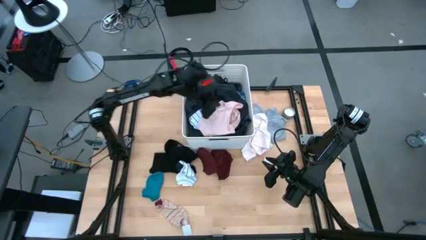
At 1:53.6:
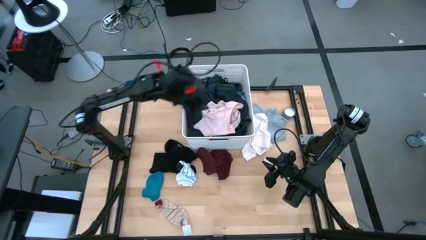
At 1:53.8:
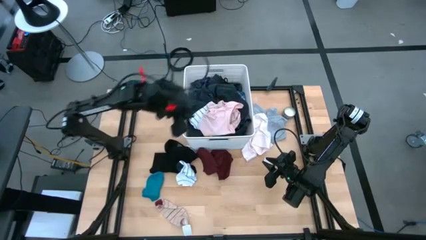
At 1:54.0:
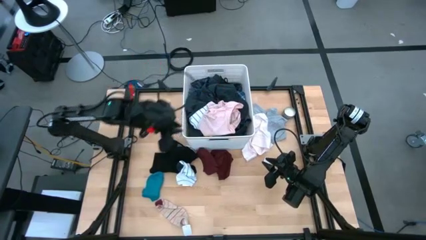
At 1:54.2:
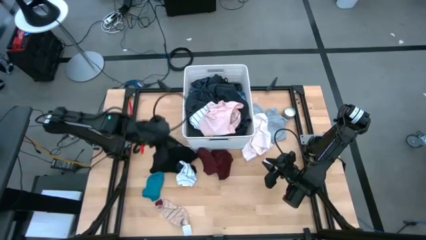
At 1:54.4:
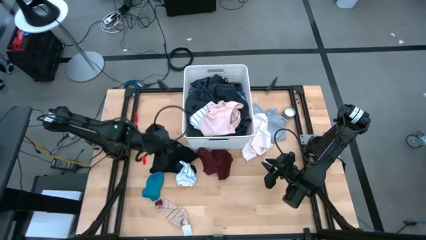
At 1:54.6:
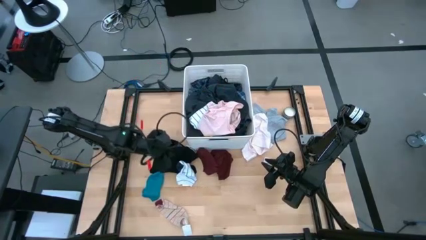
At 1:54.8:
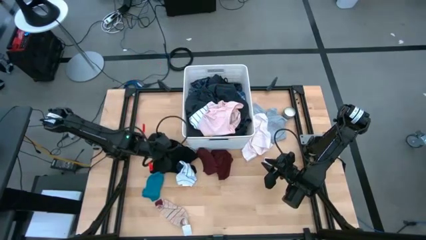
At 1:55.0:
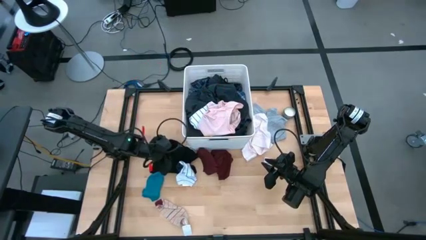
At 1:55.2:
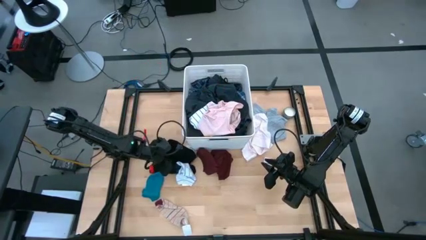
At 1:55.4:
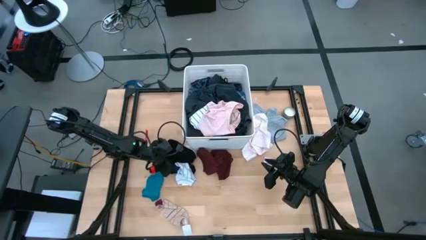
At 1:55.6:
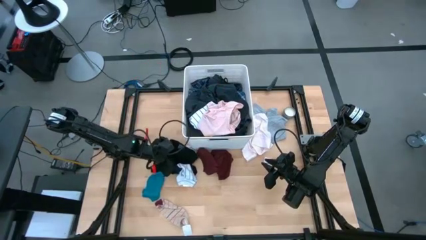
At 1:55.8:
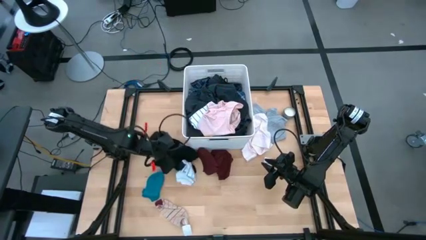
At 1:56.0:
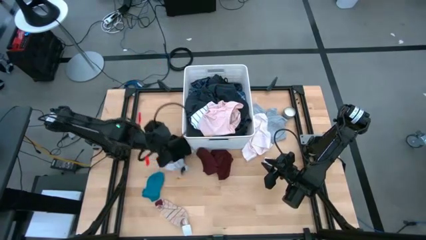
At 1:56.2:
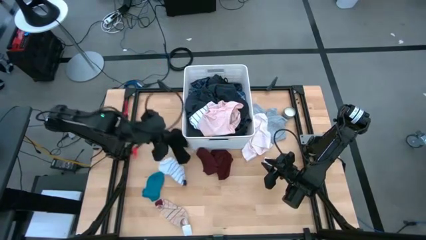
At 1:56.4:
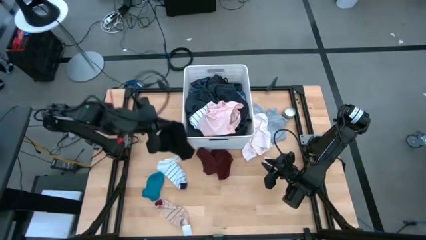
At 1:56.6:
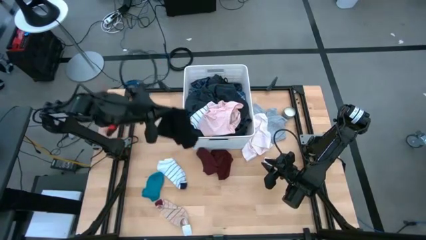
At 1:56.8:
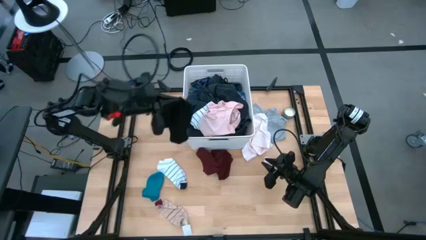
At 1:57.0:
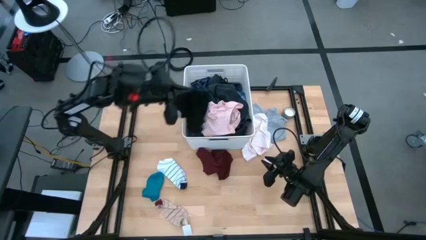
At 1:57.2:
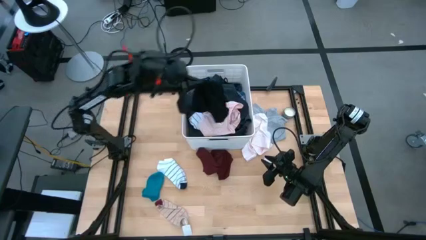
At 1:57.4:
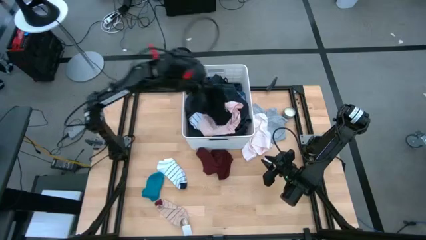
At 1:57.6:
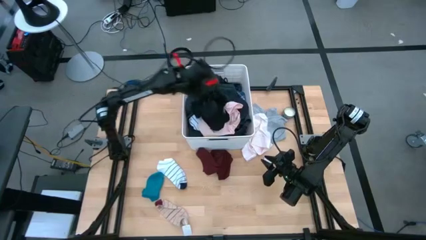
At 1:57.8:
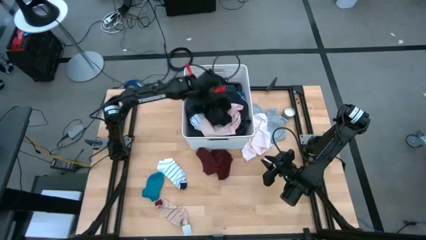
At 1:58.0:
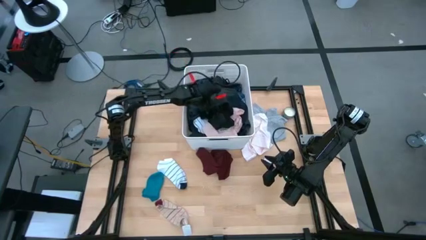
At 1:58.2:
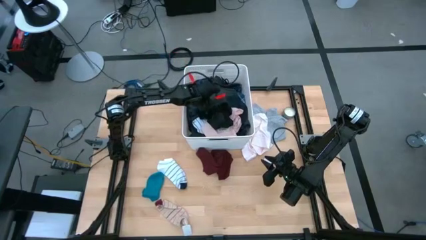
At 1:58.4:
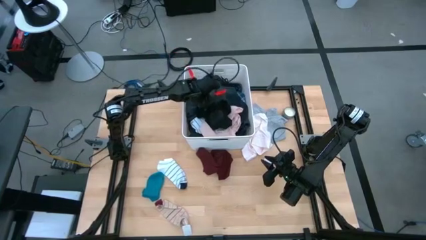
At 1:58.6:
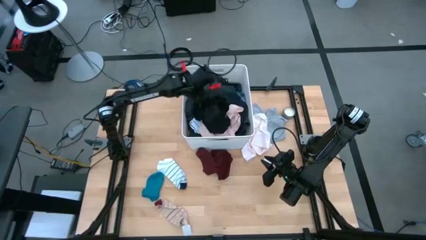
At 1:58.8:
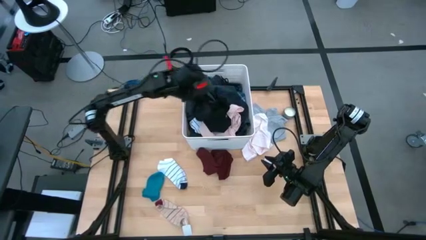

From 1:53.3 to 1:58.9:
Task: Sort clothes
Put the black underwear into the laundry bin

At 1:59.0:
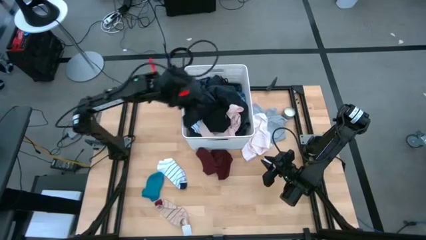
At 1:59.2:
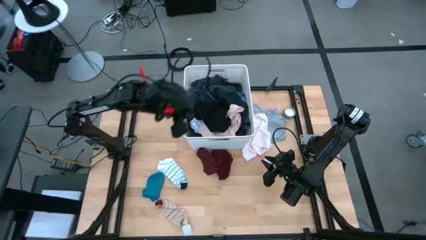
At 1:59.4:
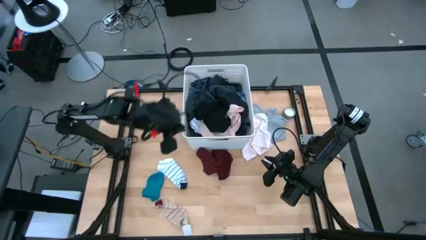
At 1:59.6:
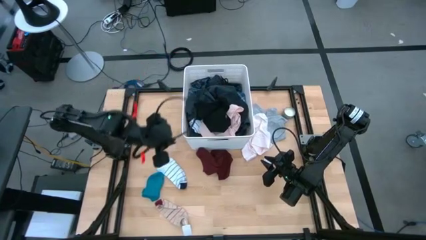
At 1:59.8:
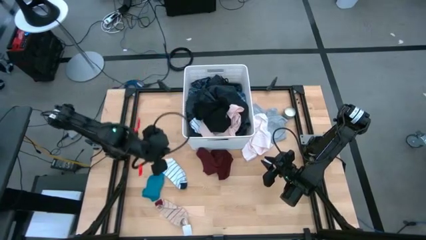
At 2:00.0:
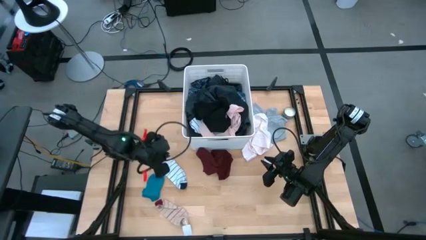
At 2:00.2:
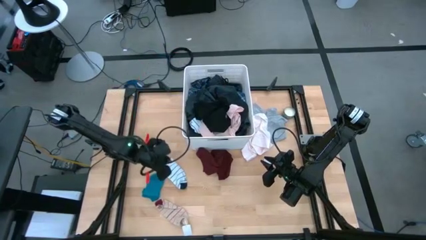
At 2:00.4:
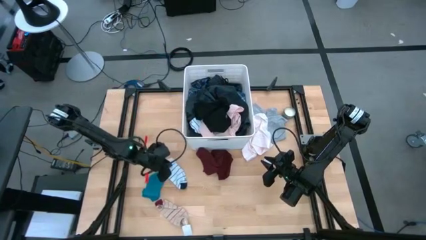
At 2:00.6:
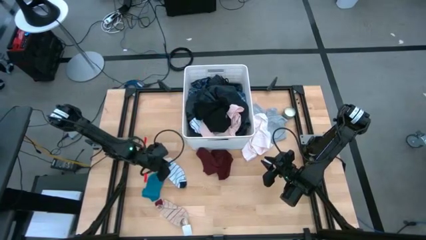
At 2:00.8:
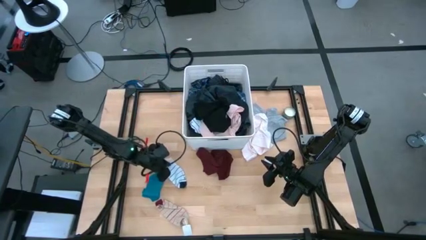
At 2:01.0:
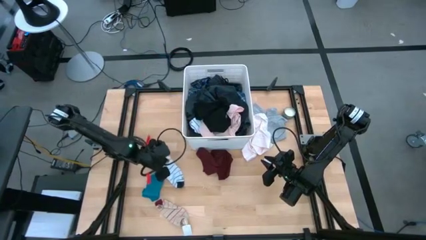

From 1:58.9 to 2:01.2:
Put the white sock into the laundry bin

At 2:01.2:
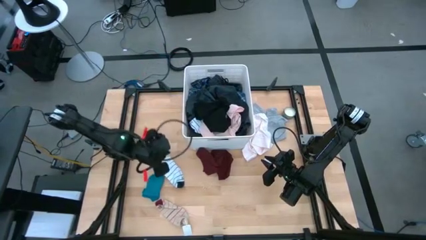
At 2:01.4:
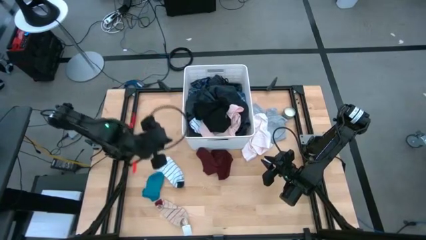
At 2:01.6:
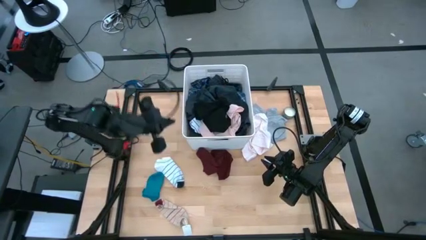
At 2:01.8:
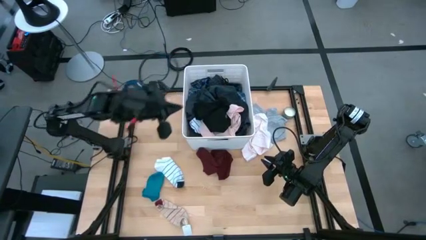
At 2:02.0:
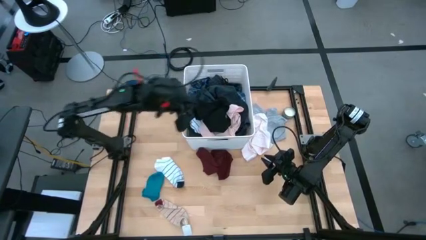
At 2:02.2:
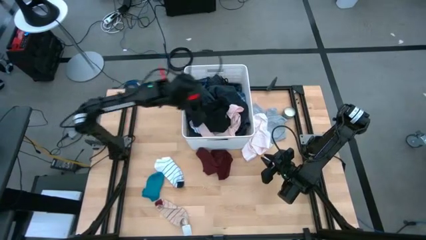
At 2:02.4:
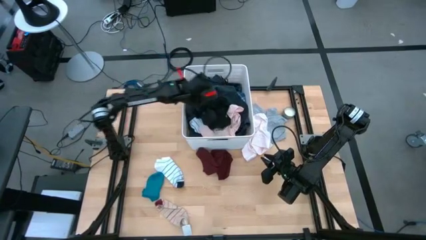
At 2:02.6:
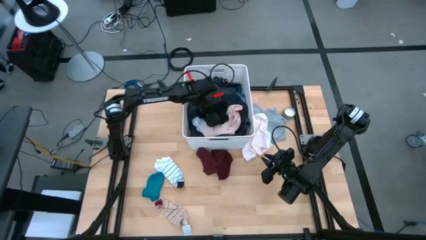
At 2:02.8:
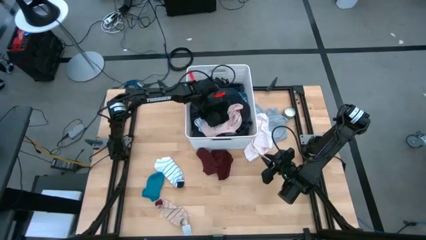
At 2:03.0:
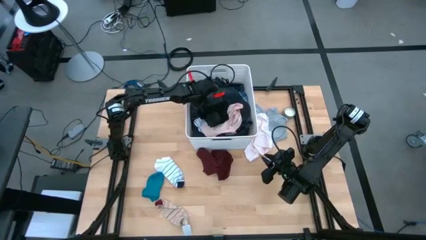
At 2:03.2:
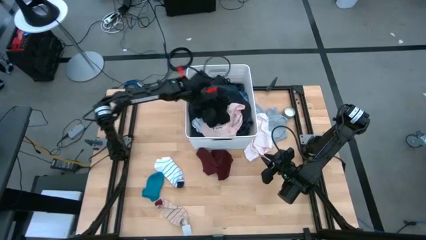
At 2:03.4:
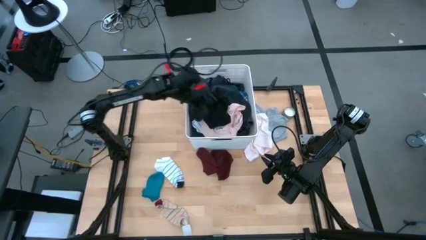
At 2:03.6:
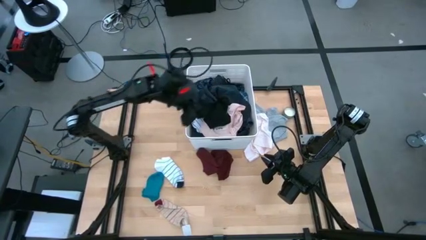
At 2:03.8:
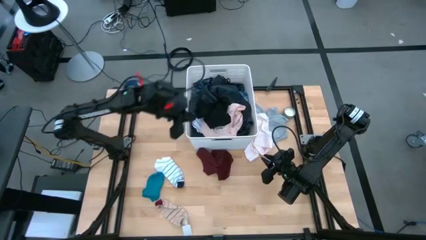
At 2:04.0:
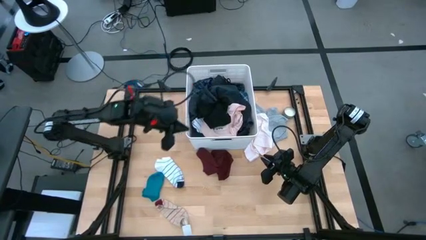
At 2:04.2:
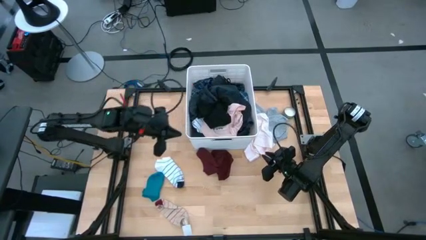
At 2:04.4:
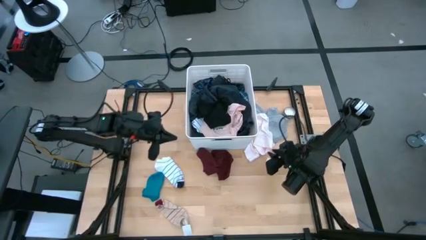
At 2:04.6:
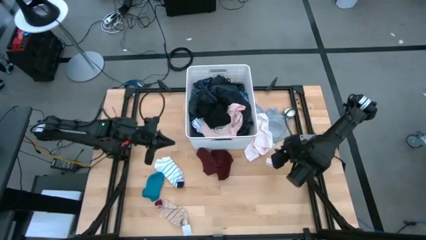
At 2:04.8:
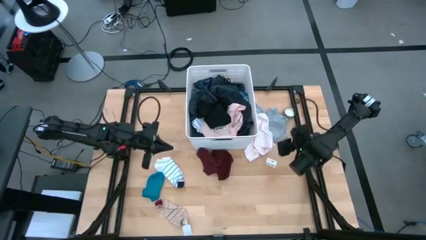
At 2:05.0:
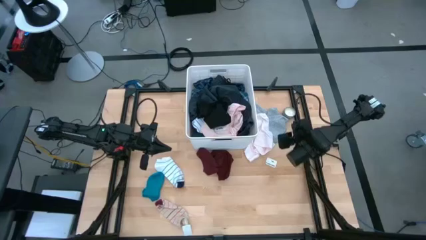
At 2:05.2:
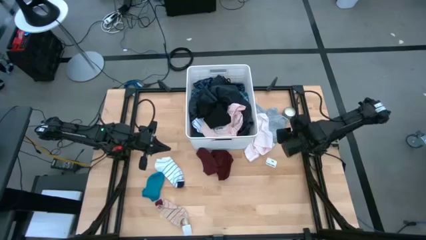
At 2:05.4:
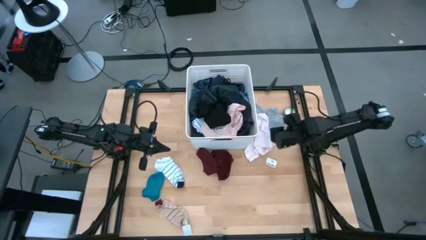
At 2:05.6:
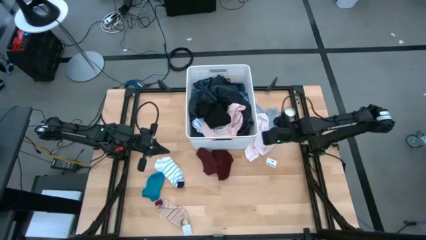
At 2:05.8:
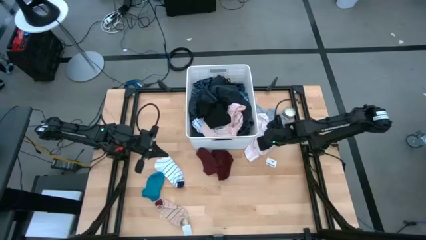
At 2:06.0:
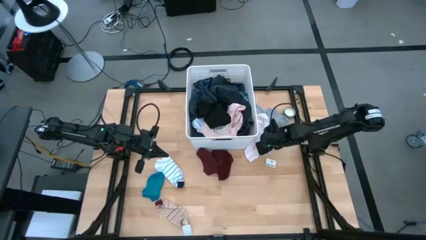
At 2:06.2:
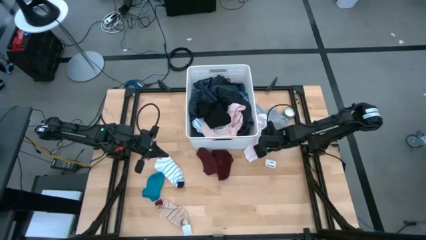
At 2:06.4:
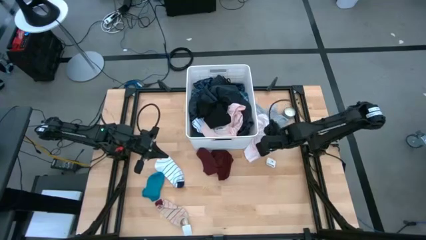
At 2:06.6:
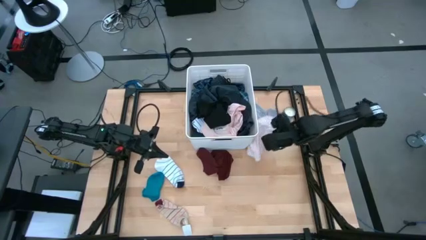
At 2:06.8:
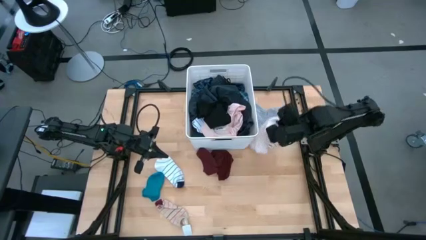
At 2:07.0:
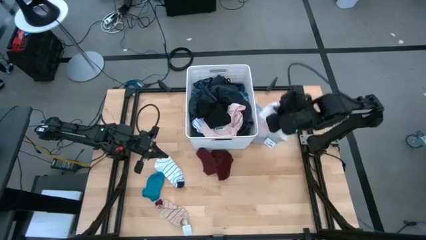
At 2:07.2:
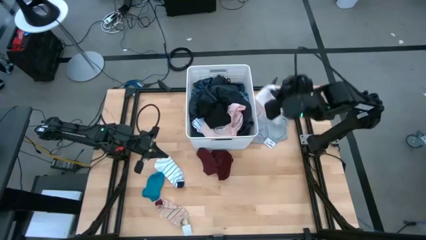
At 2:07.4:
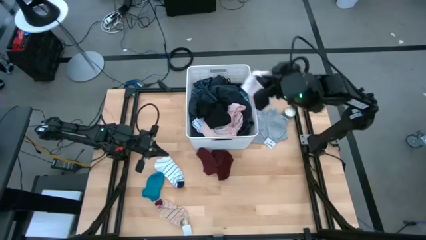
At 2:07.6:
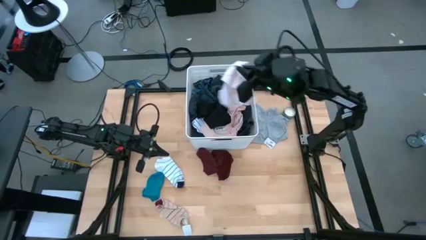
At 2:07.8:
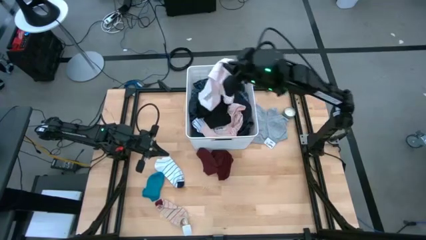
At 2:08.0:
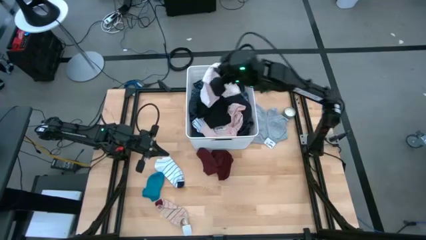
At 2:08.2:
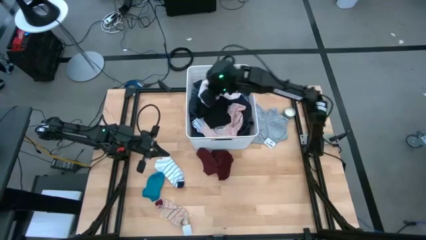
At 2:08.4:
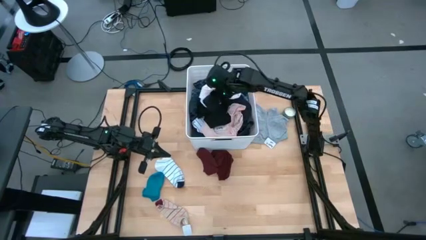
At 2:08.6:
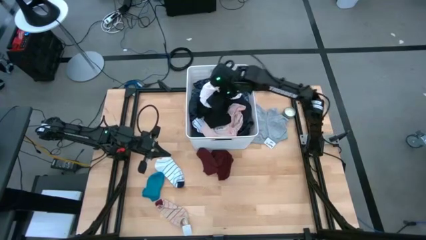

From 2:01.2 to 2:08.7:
Put the pink underwear into the laundry bin
